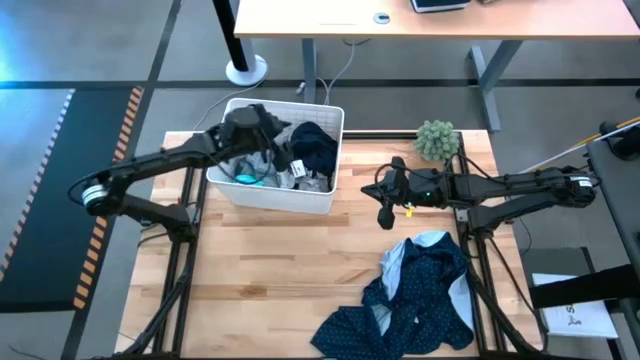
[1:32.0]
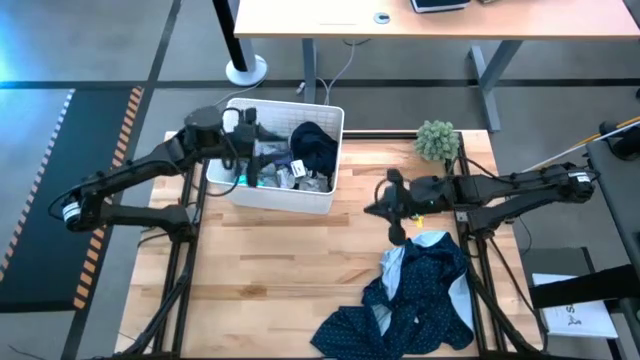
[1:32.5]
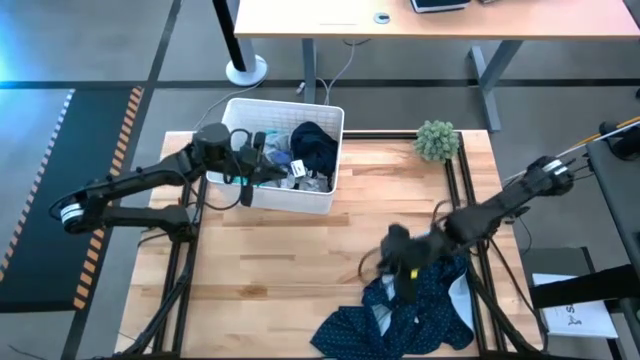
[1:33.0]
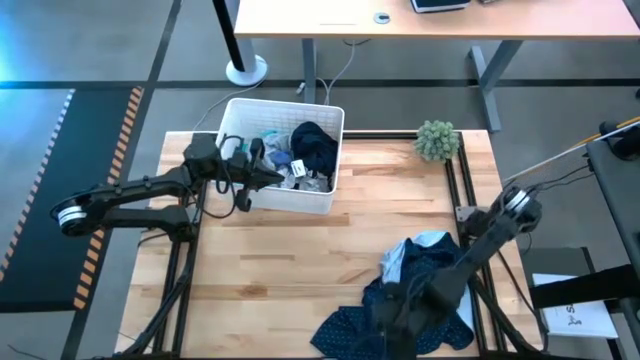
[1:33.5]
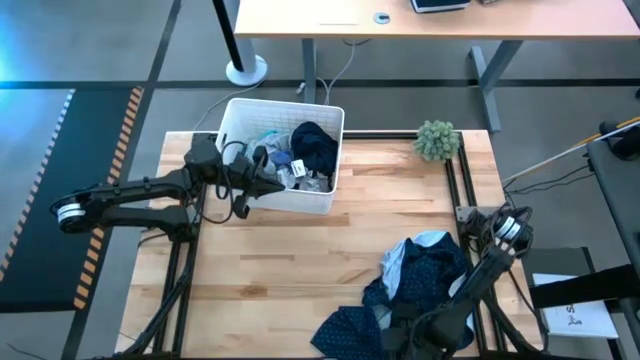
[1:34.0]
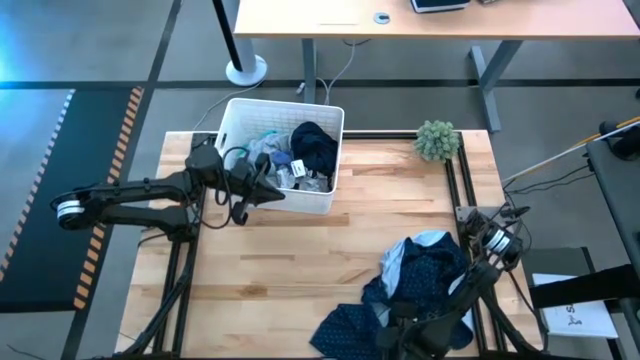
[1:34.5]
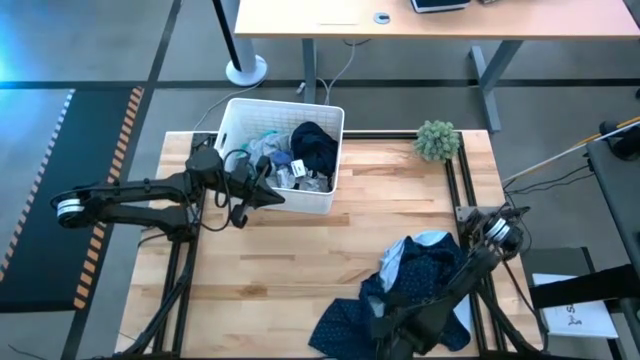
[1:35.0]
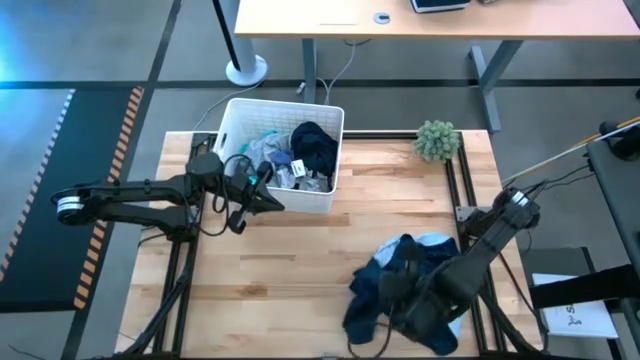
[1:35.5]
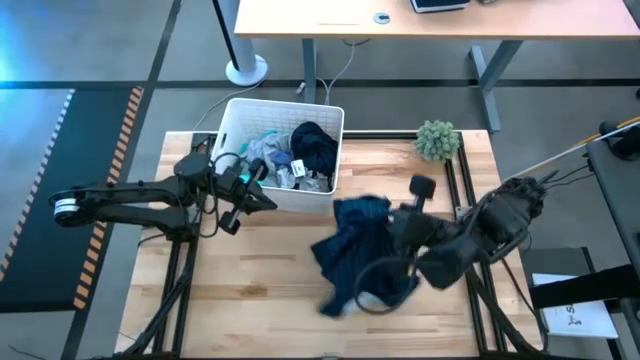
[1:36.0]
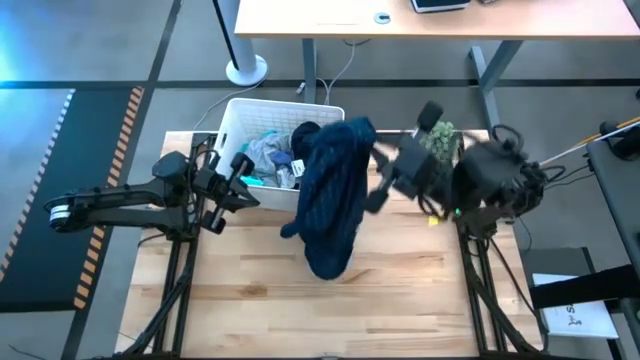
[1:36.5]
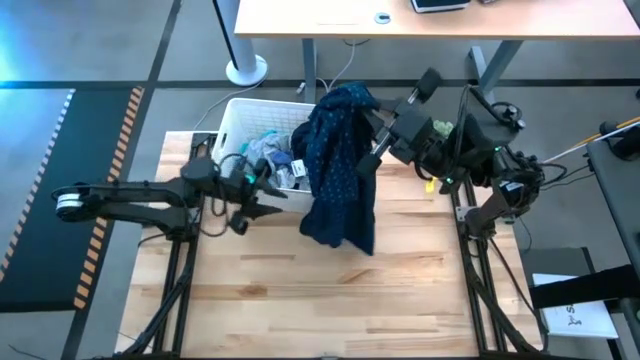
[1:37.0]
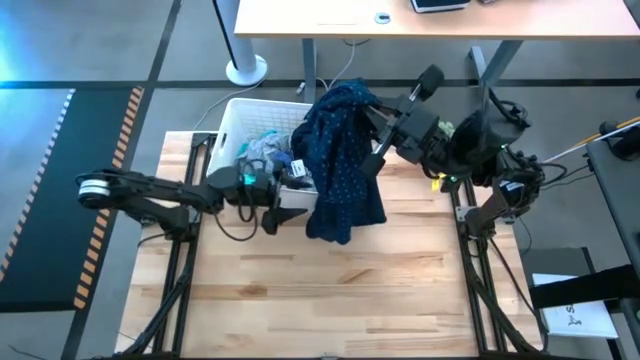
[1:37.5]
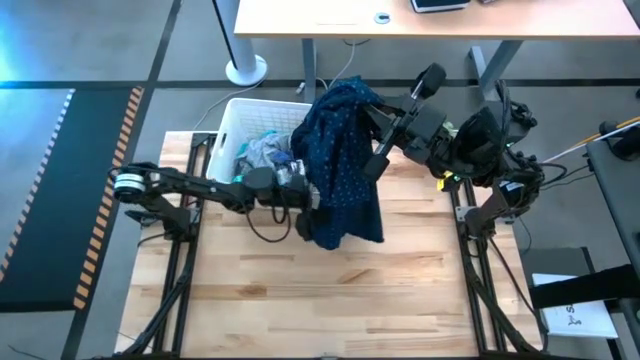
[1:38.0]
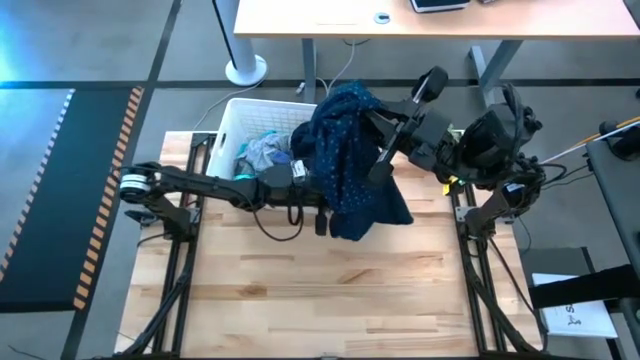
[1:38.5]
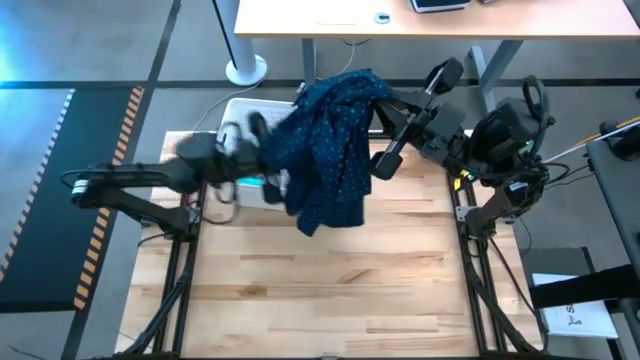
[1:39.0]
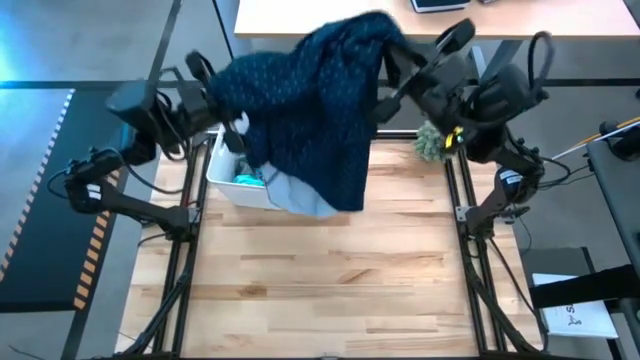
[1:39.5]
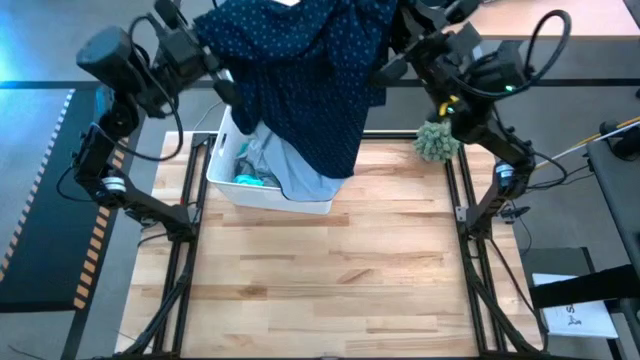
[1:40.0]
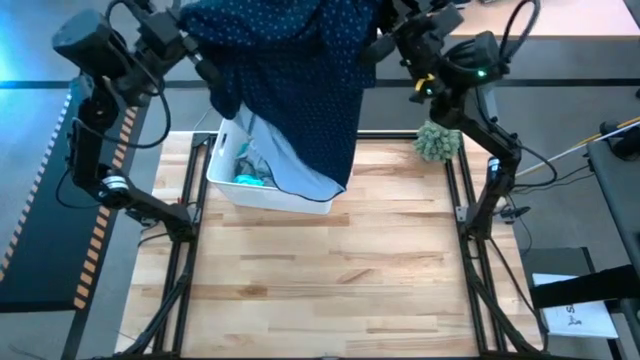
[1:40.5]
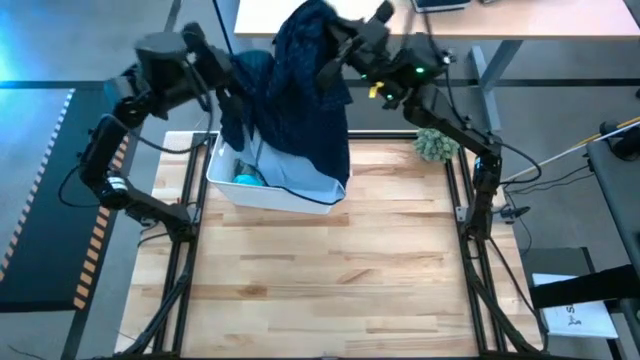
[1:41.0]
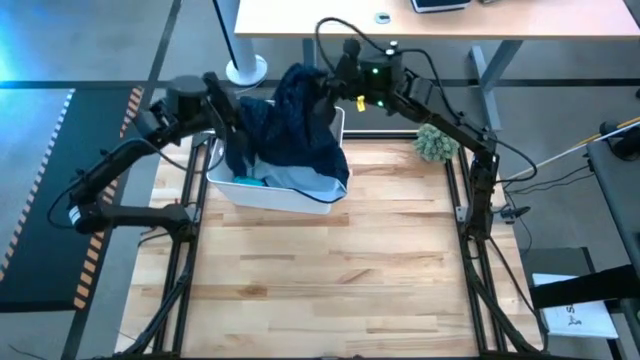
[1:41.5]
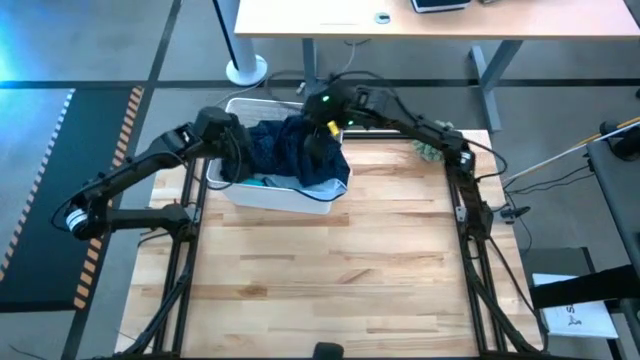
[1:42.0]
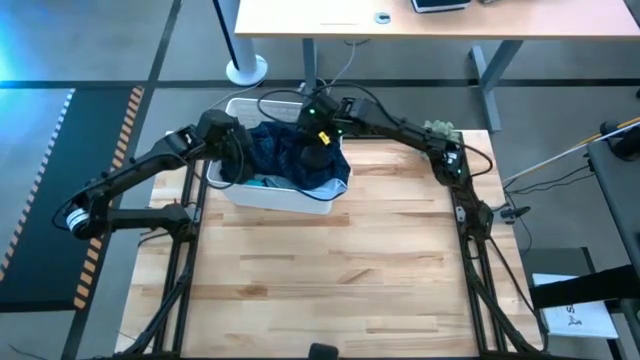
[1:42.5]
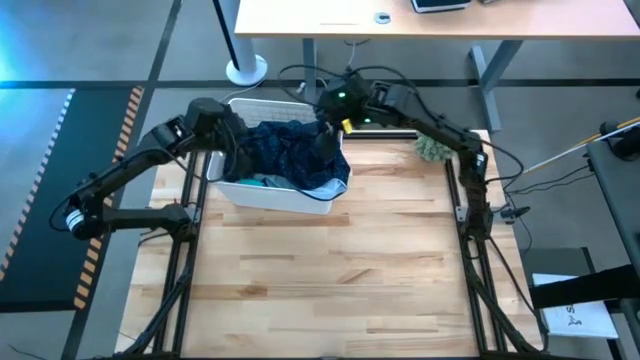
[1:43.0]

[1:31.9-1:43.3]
Task: Sort clothes
Put the patient gown into the bin

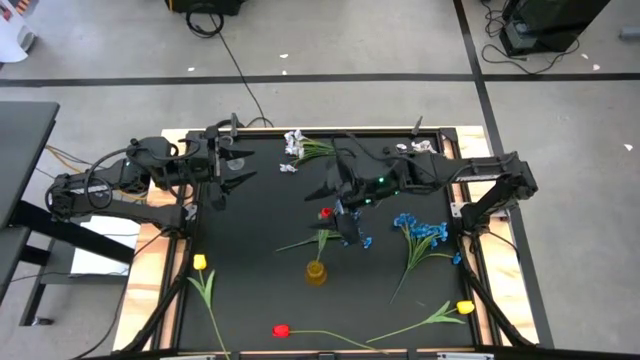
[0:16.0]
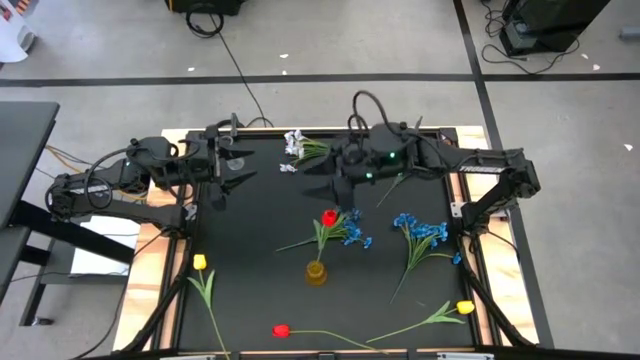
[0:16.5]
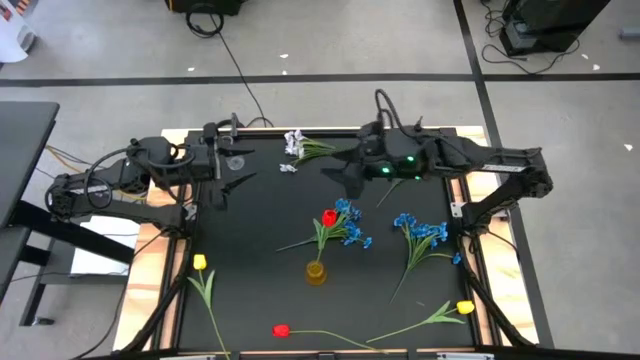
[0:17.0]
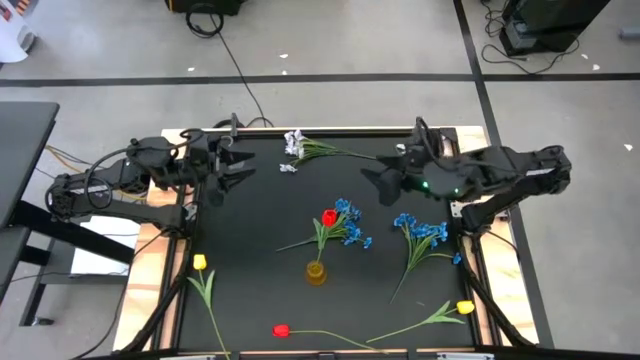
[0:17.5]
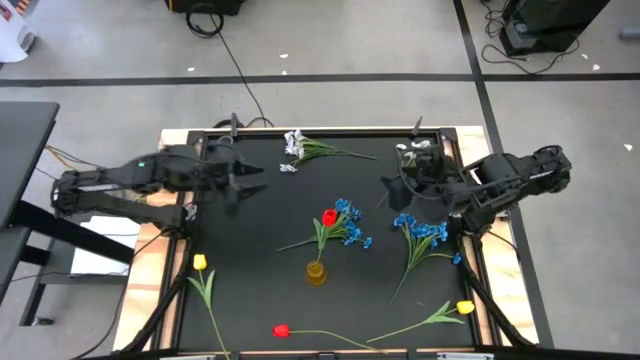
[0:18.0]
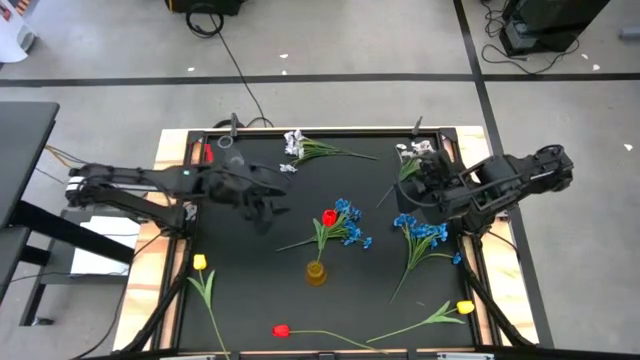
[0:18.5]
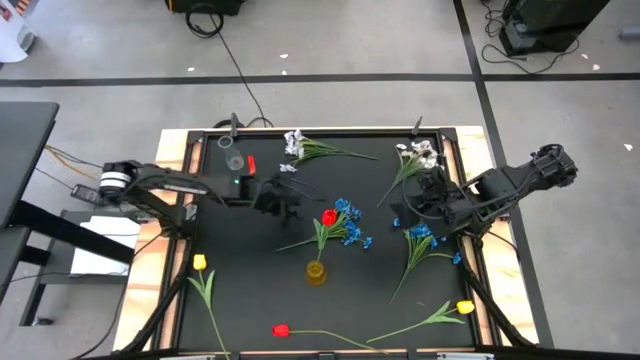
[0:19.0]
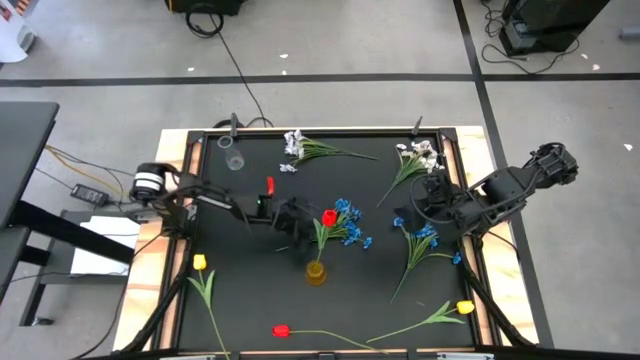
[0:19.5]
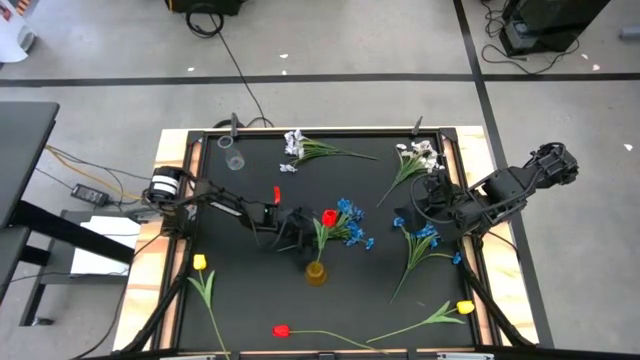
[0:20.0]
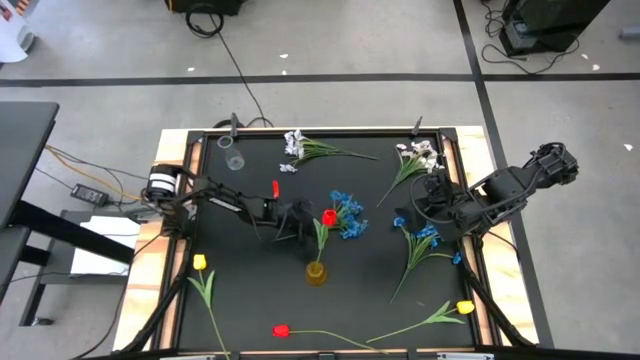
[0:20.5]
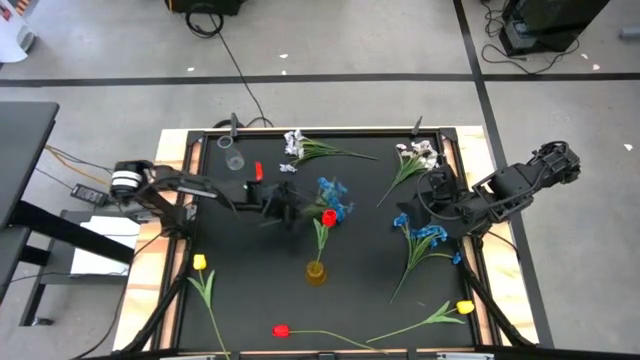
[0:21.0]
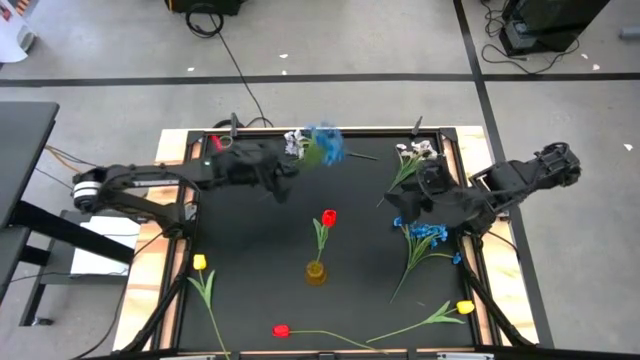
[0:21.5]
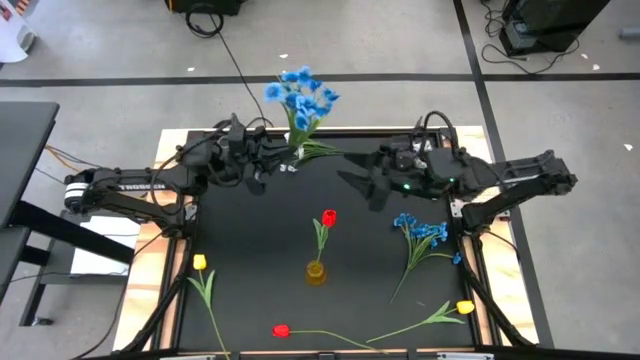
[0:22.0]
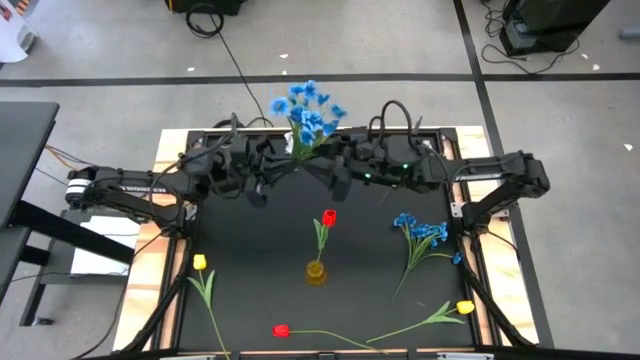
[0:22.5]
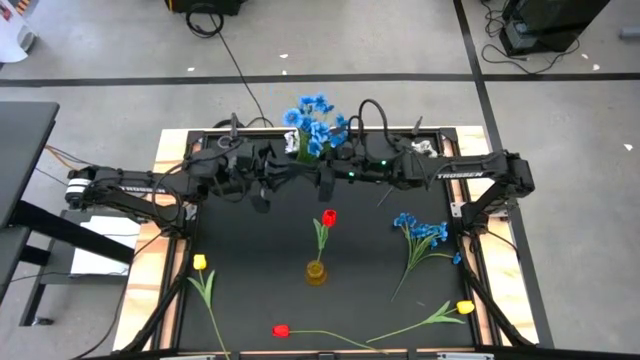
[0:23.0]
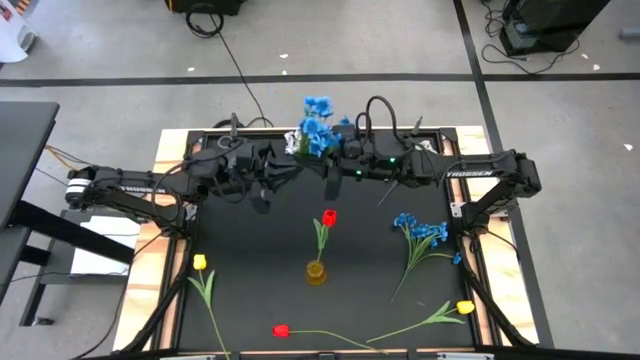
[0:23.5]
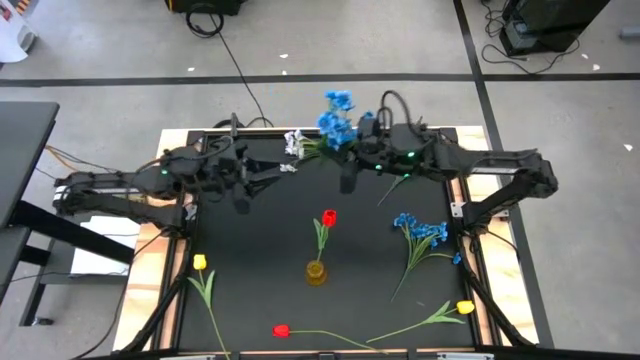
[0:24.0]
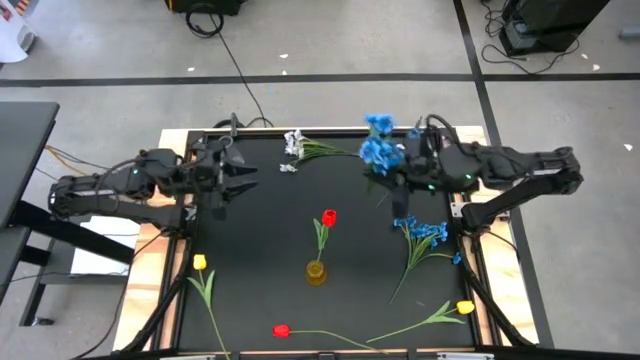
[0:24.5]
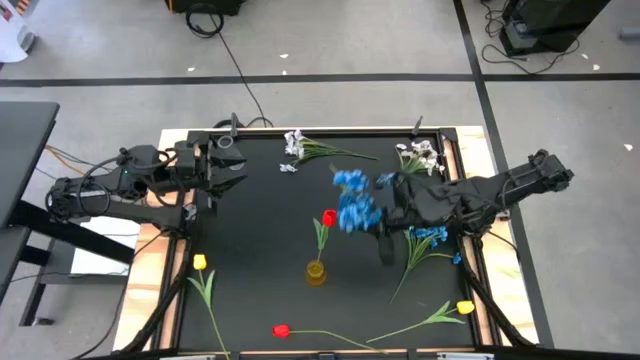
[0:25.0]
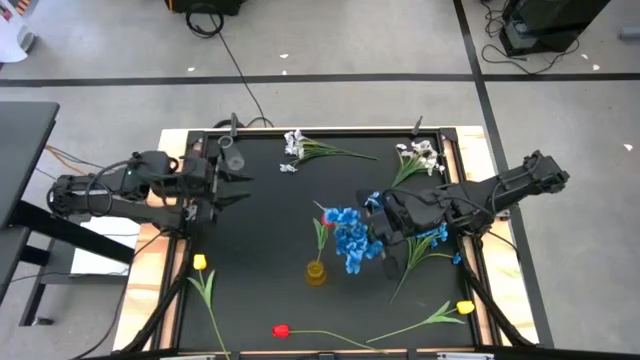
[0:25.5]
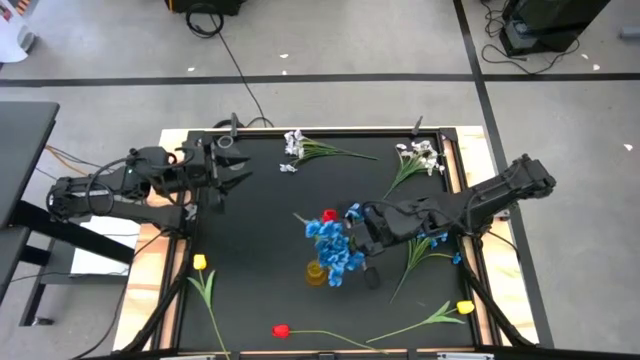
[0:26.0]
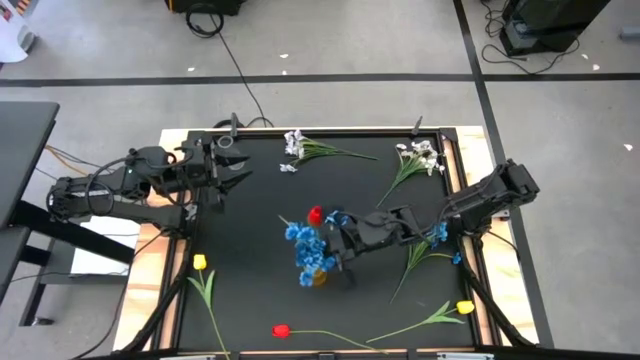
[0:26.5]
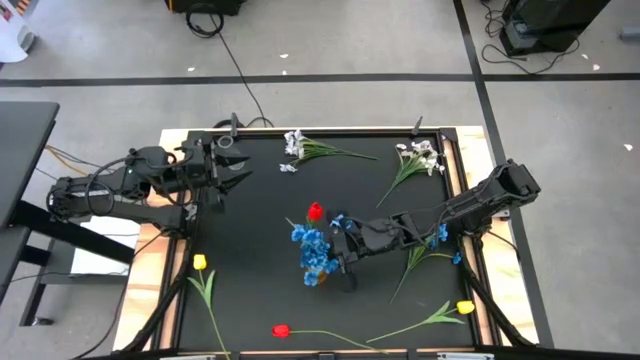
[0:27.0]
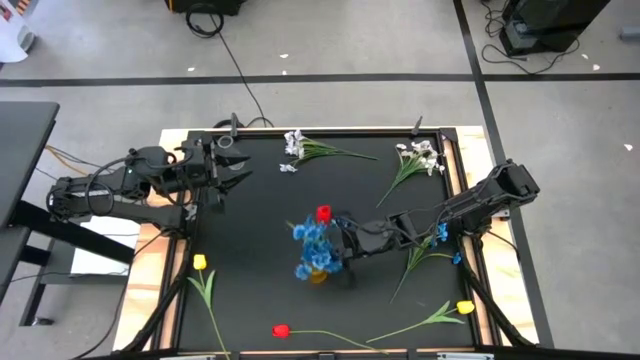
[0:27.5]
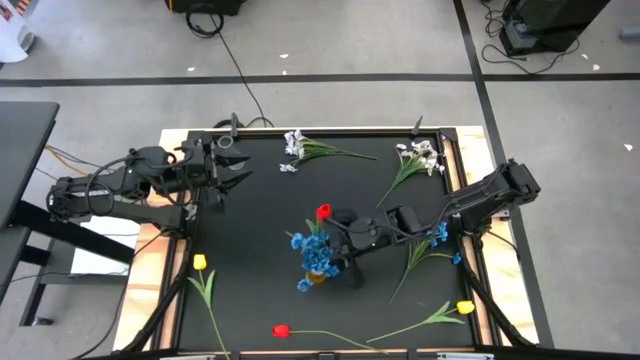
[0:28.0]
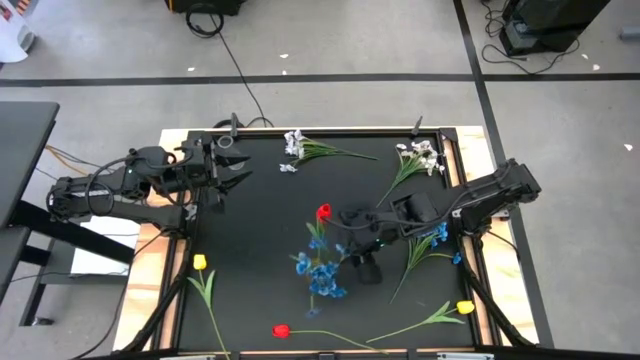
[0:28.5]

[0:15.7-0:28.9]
Task: Sort flowers into vase by color
Put the left blue flowers into the yellow vase
